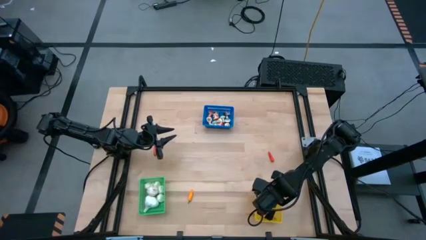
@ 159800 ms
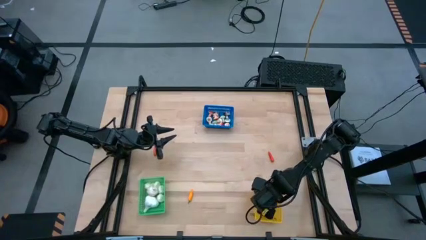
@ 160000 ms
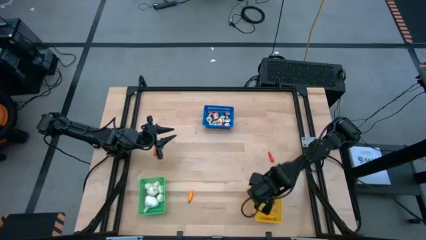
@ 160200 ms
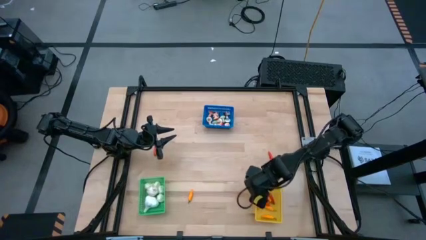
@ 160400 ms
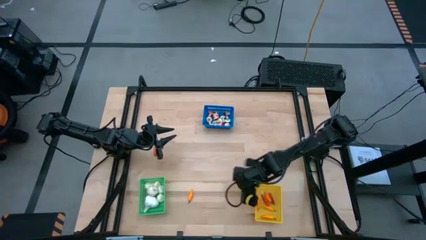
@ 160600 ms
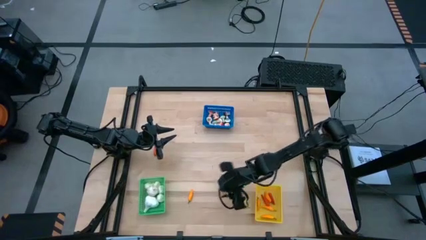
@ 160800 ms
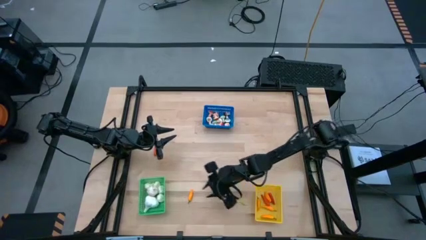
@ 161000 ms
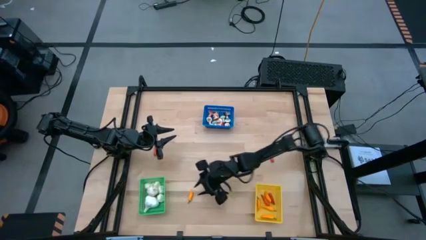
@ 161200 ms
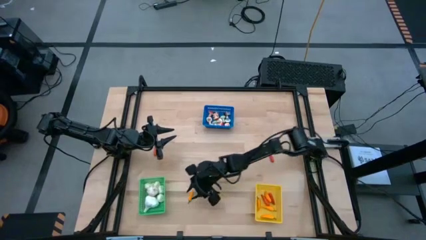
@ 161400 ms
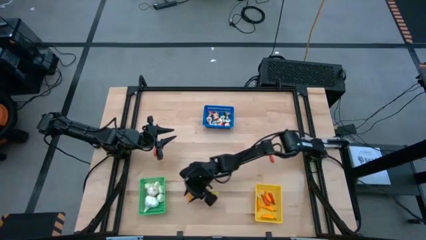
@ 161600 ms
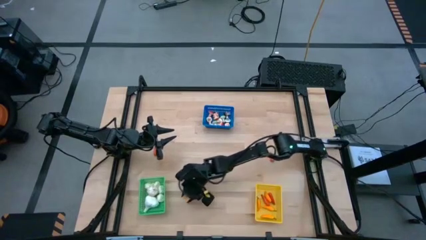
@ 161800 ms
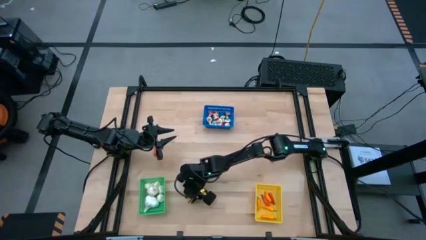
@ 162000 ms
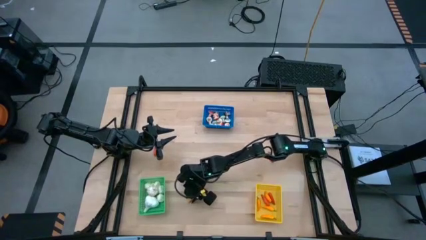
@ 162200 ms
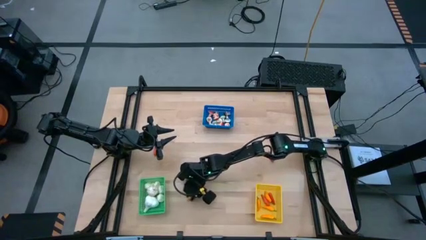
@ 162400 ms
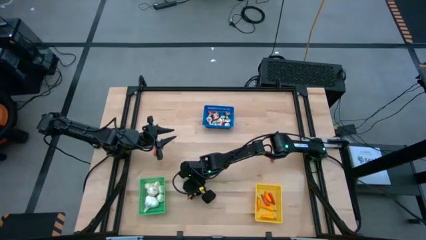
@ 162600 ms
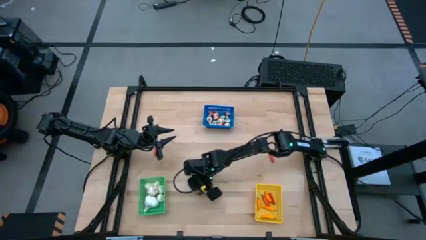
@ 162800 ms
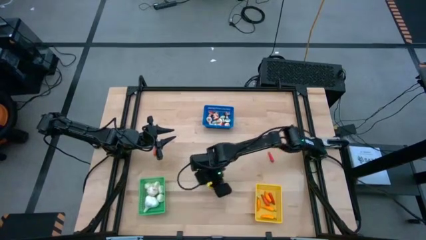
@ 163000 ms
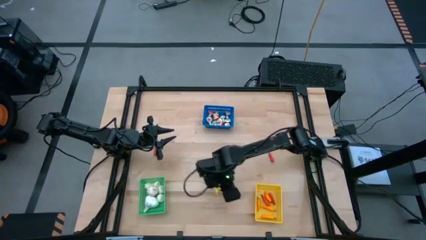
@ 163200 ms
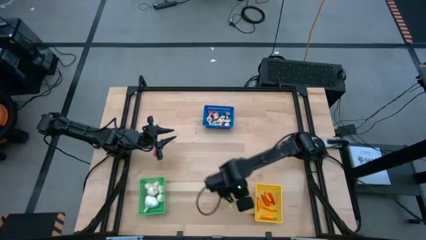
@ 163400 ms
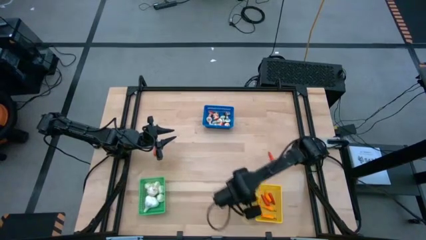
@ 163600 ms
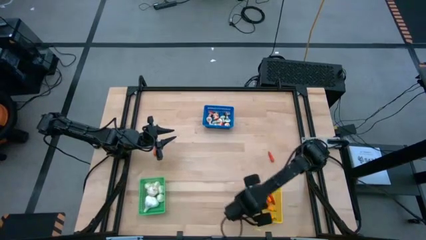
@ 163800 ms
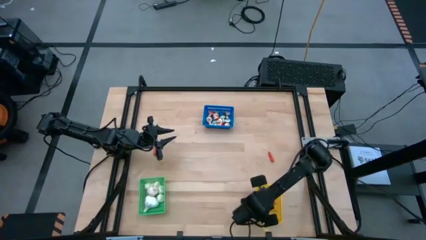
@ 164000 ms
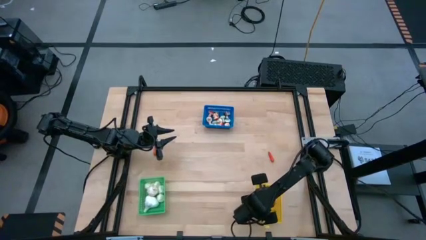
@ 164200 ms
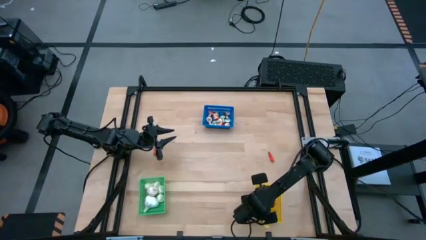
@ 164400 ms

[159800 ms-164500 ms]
Task: Sort produce into baskets
Put the yellow chili pepper into the yellow bin

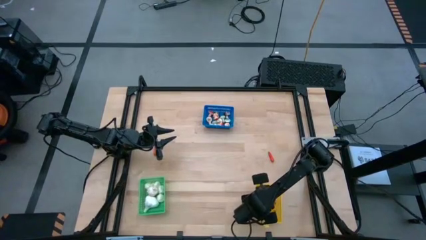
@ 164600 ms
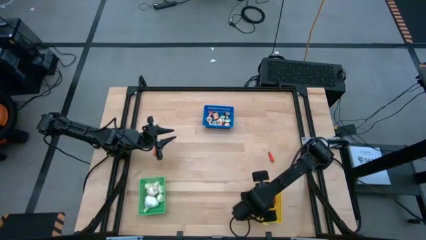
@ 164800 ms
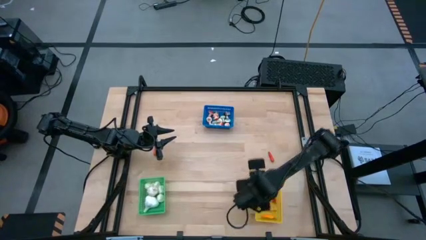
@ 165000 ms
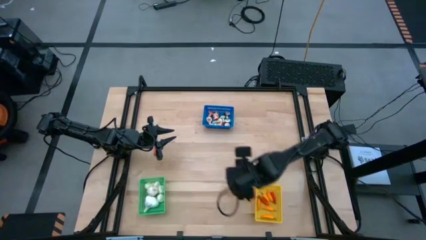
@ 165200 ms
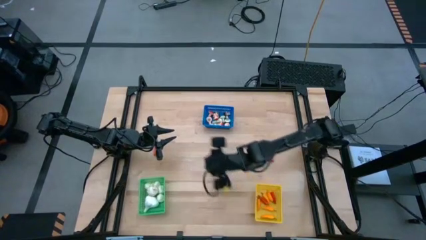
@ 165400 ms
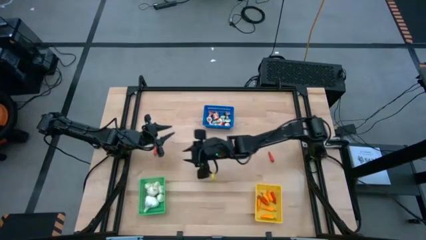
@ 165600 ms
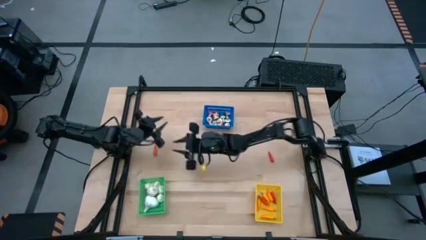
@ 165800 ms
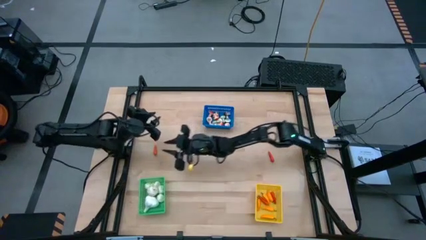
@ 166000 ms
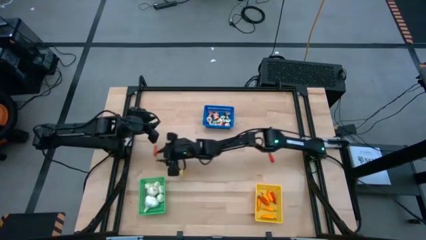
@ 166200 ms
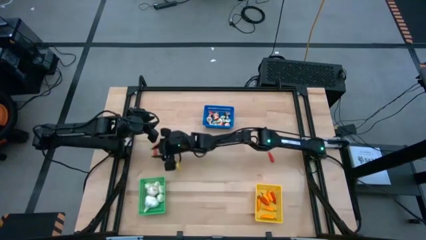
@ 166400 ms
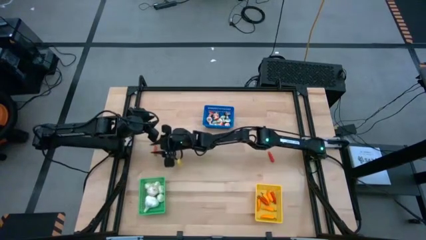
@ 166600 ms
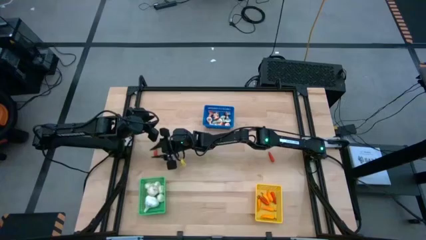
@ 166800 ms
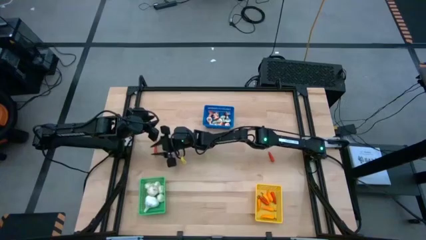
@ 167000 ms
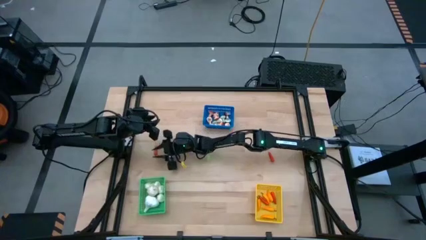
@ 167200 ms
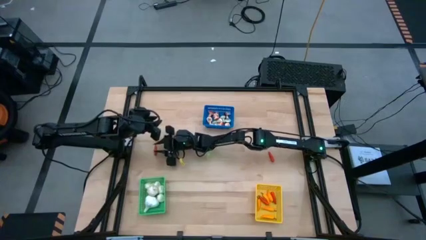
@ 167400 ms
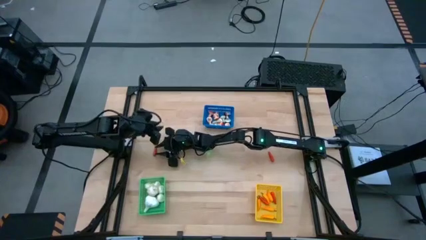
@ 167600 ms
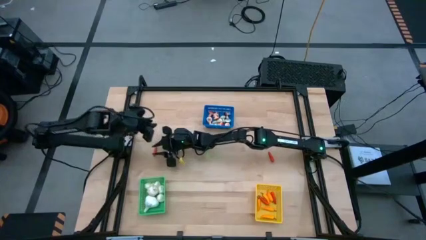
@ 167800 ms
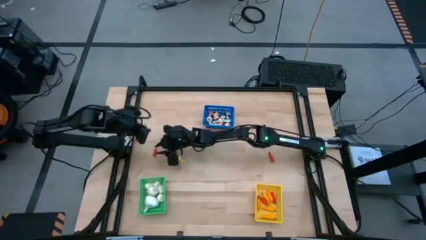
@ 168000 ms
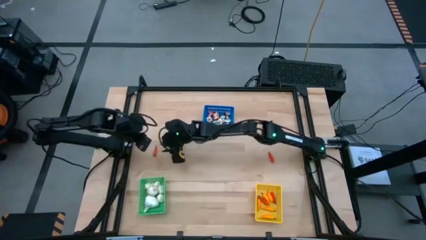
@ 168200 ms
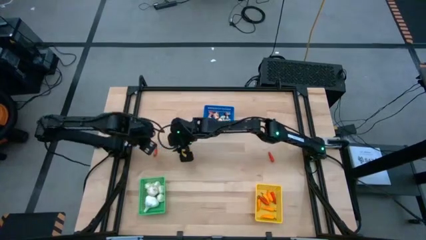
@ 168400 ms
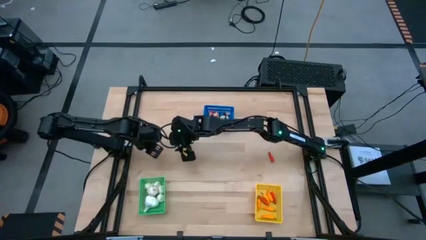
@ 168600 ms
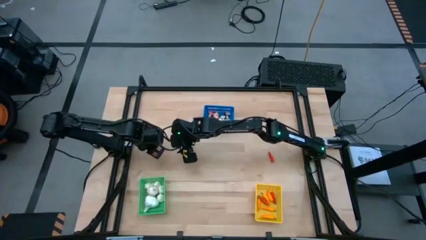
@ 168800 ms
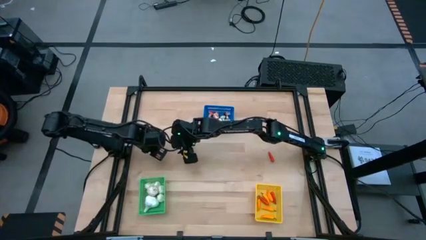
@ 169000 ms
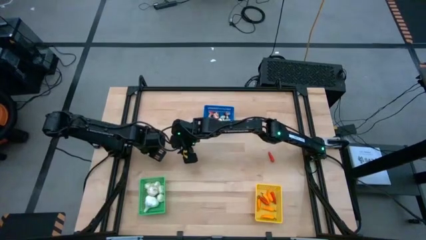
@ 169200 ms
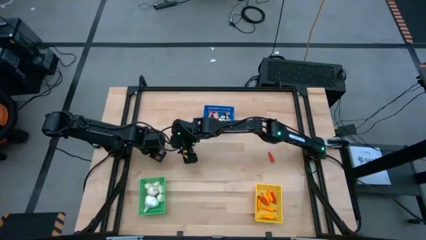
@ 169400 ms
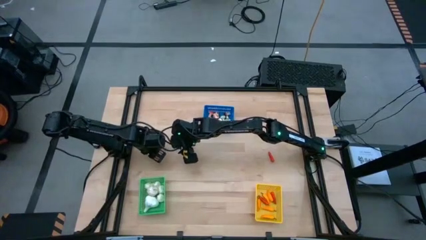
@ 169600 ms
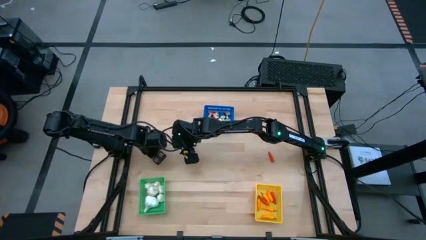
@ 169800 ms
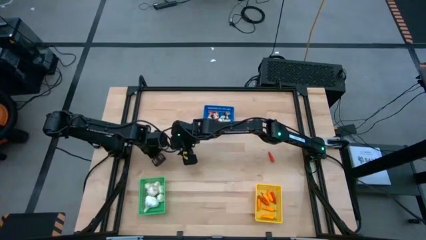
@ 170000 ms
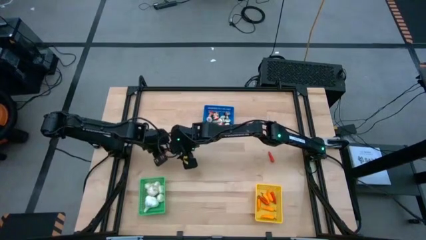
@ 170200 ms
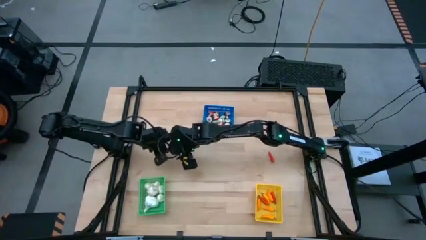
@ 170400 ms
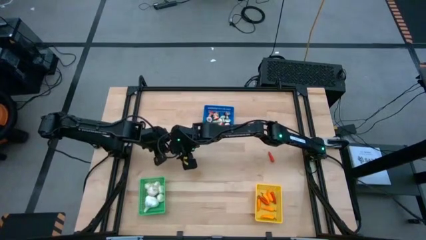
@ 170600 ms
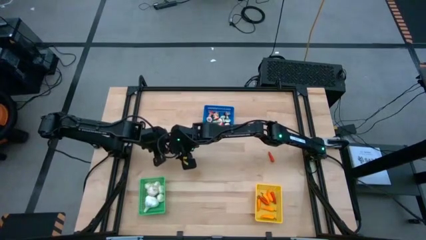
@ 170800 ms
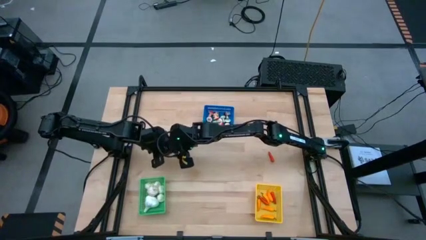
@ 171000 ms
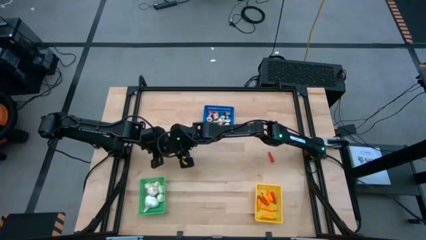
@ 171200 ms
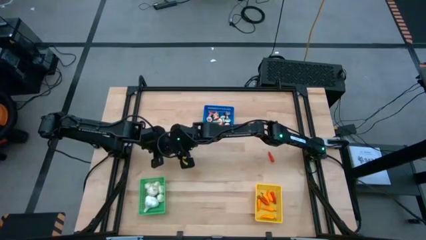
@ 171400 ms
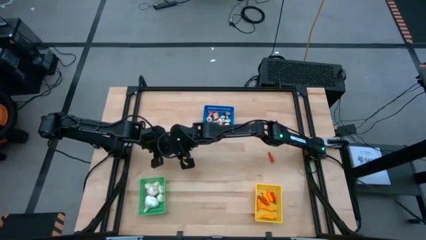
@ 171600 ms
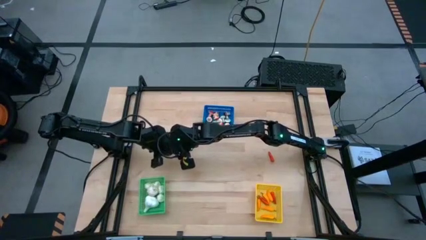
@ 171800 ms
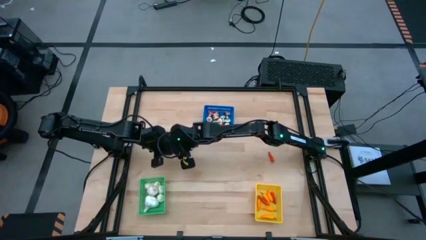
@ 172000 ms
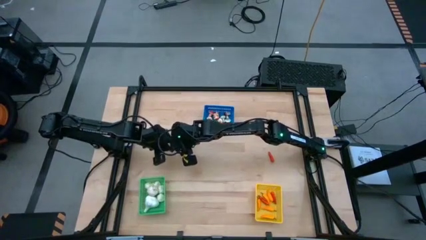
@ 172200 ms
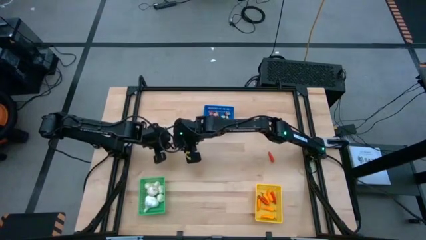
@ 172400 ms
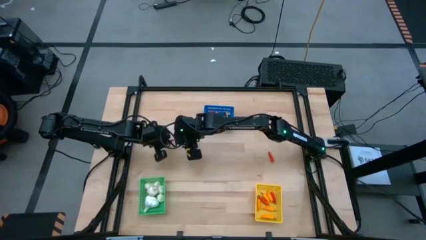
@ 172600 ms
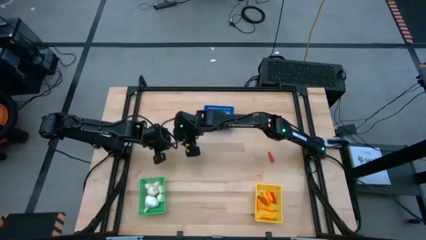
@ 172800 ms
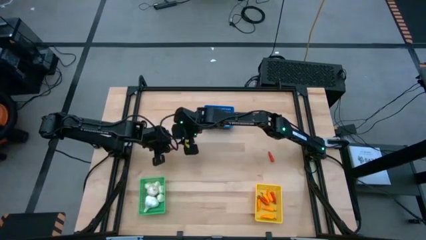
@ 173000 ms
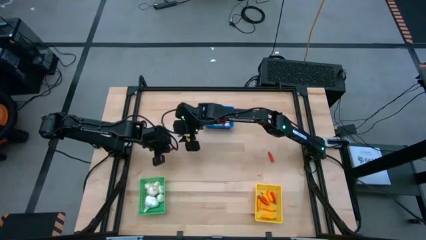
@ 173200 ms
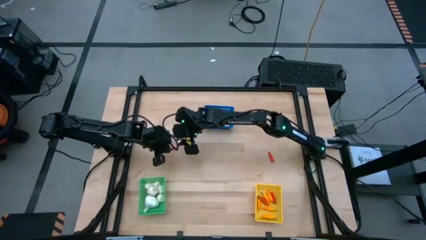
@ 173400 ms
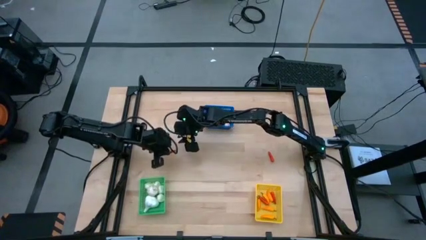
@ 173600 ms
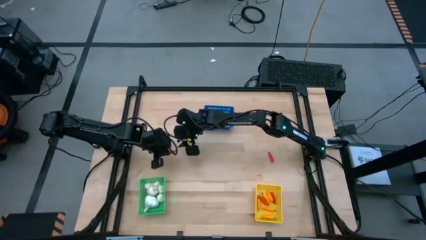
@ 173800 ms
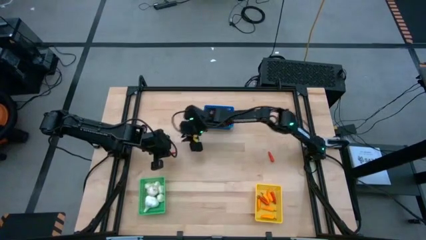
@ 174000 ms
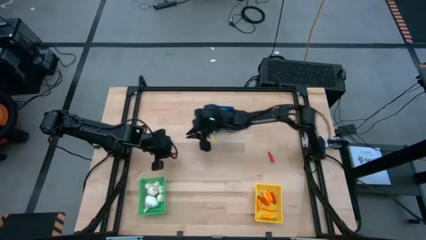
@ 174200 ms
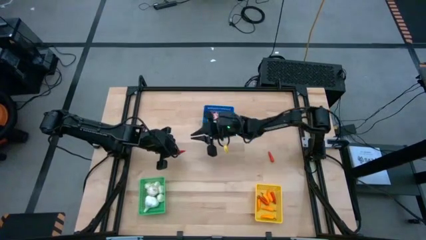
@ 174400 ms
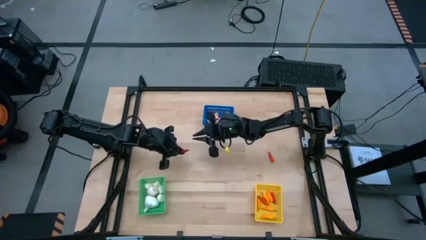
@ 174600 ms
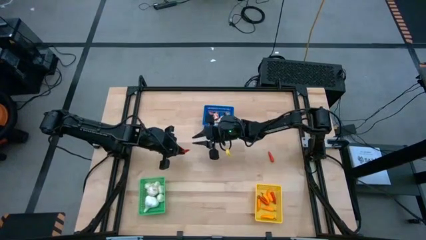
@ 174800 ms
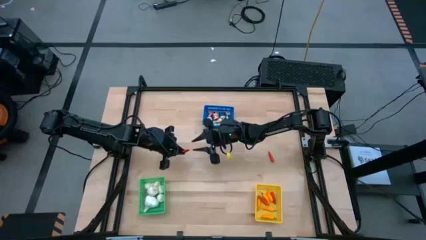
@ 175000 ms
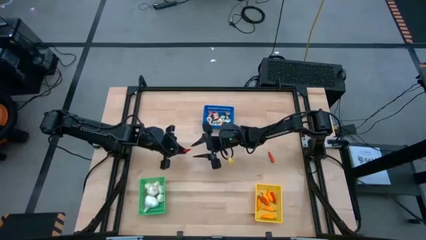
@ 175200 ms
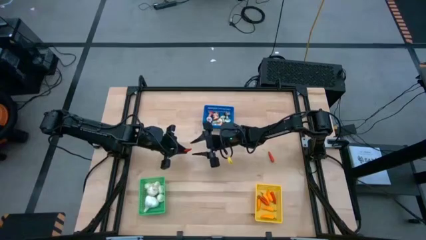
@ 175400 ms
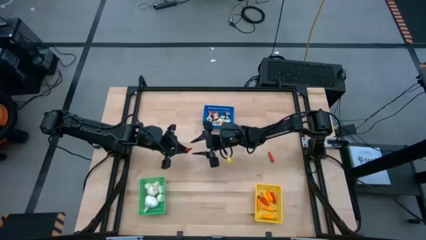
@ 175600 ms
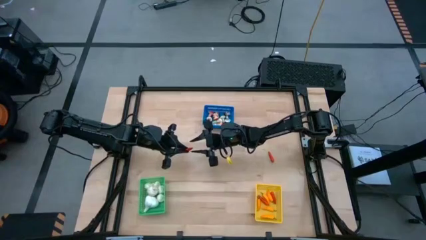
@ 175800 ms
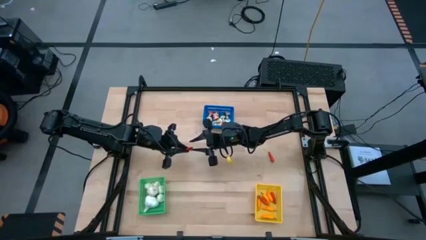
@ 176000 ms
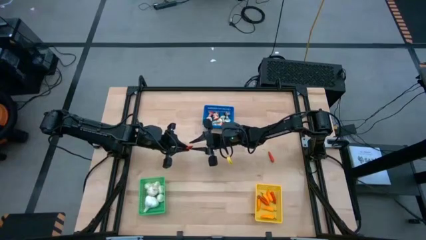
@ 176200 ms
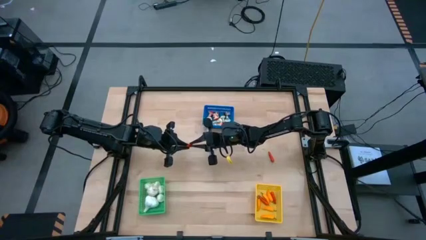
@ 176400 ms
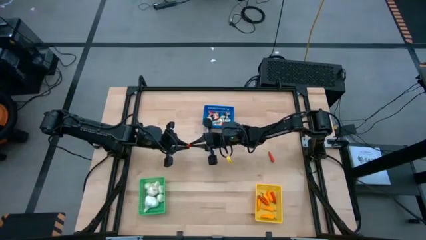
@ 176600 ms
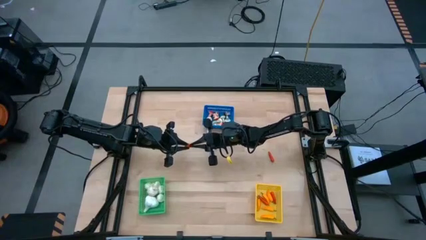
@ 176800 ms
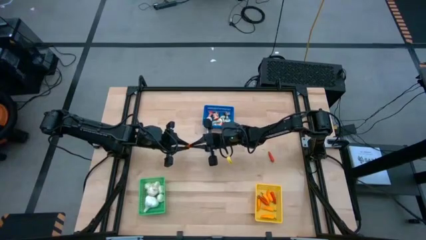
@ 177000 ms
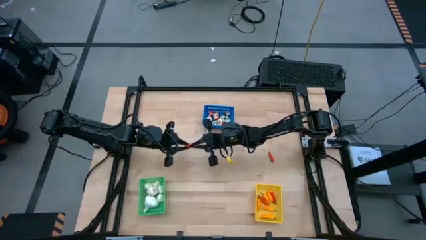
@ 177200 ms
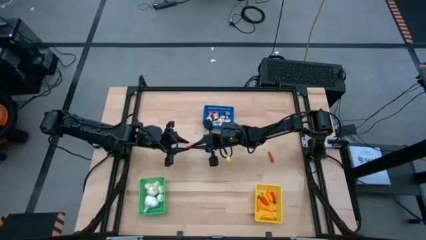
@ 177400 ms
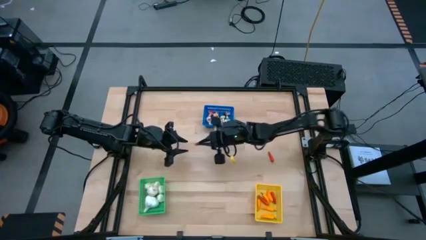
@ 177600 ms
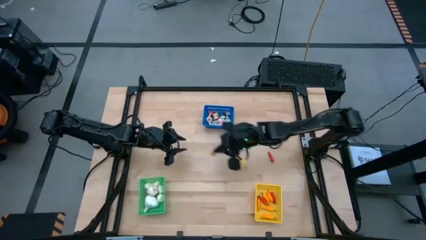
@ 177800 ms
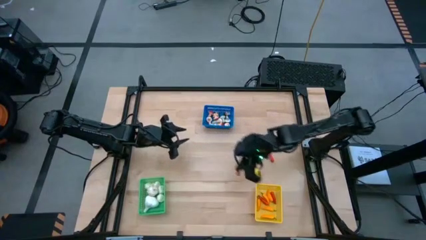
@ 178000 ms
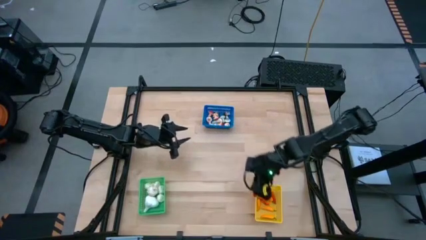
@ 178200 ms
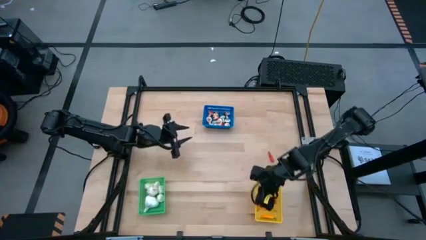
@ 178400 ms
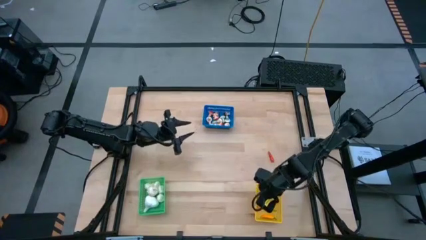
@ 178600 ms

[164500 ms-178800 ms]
Put the orange chili pepper into the yellow bin
